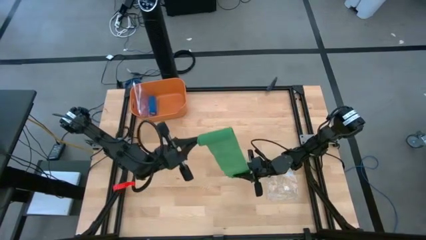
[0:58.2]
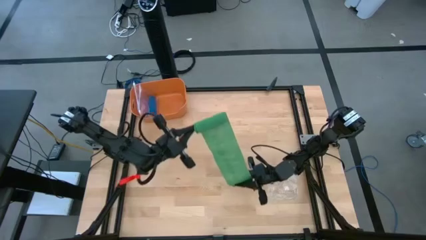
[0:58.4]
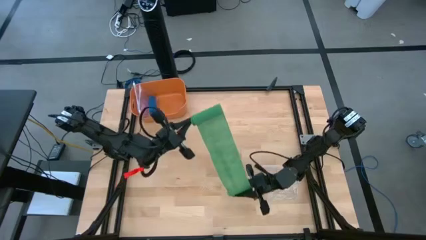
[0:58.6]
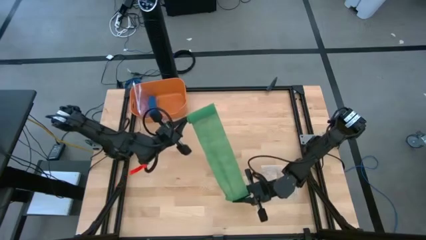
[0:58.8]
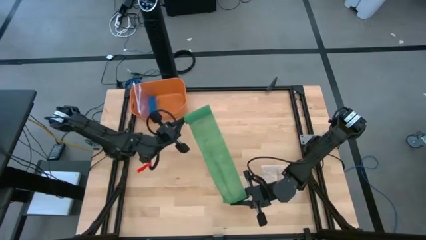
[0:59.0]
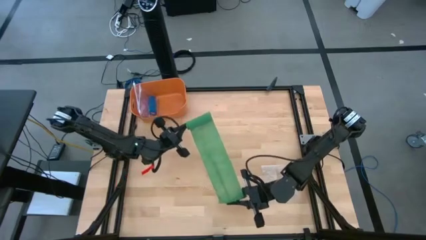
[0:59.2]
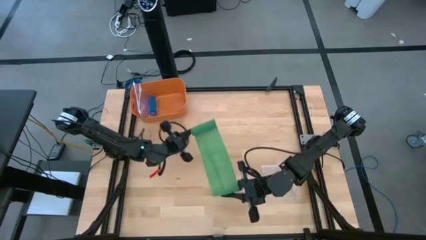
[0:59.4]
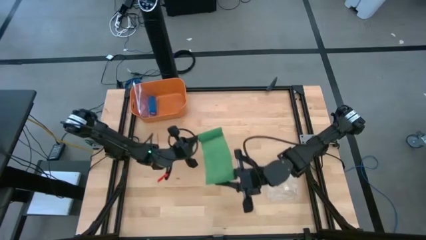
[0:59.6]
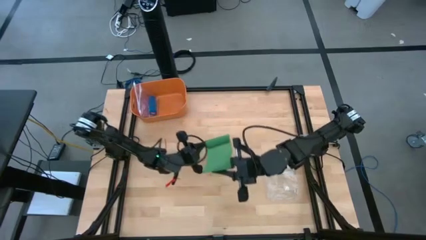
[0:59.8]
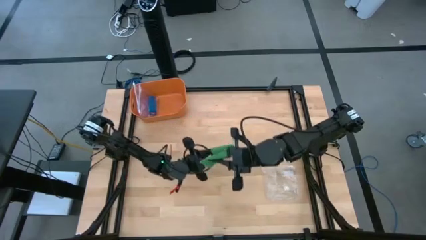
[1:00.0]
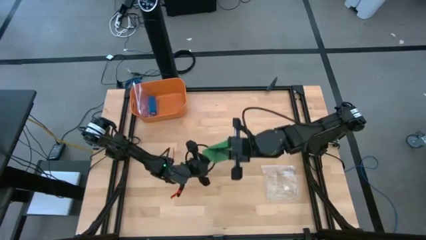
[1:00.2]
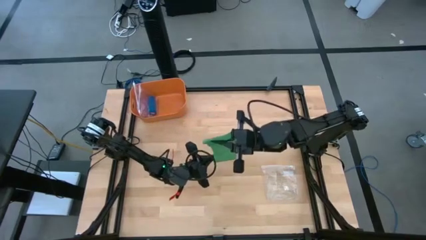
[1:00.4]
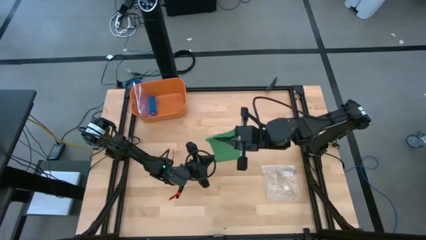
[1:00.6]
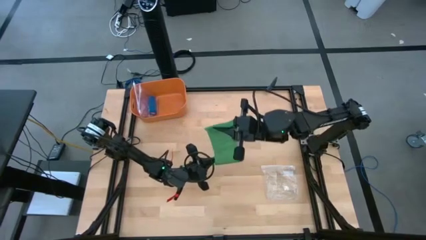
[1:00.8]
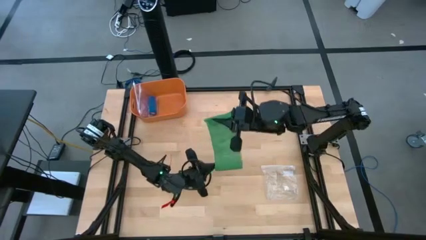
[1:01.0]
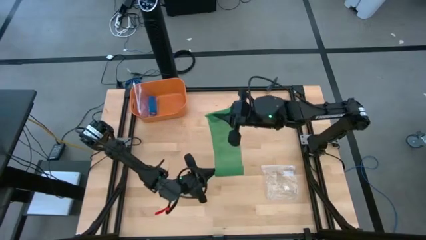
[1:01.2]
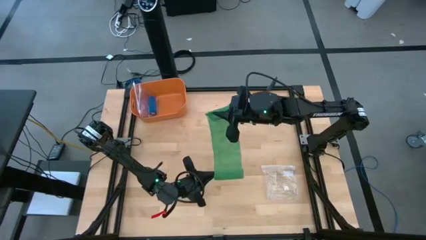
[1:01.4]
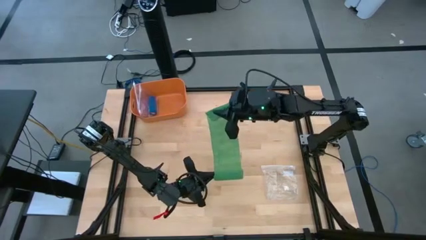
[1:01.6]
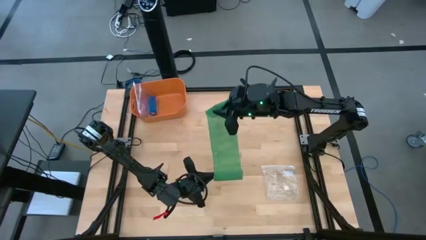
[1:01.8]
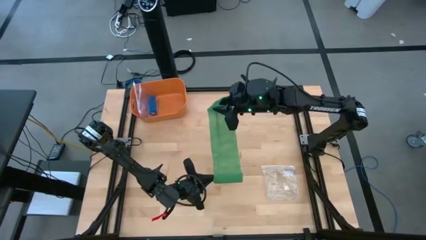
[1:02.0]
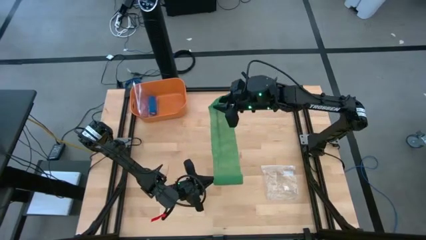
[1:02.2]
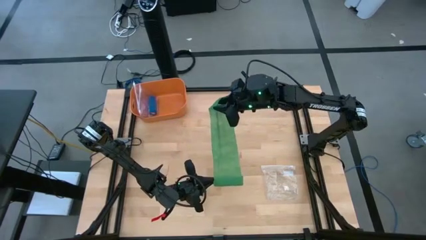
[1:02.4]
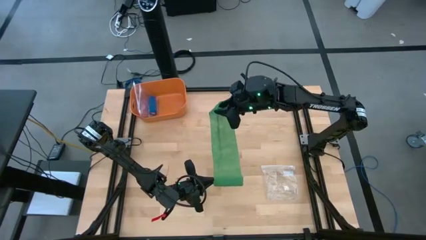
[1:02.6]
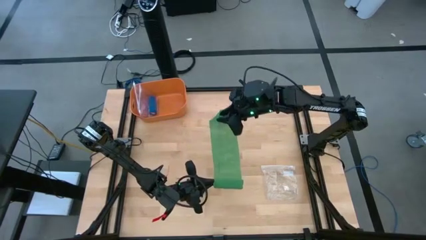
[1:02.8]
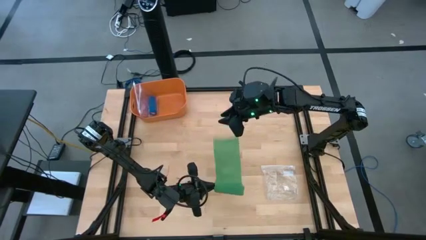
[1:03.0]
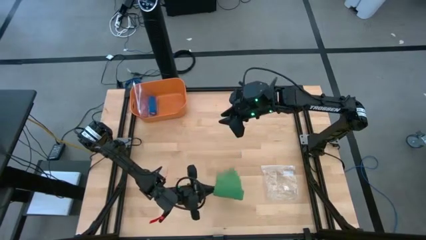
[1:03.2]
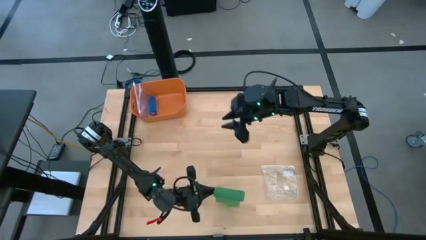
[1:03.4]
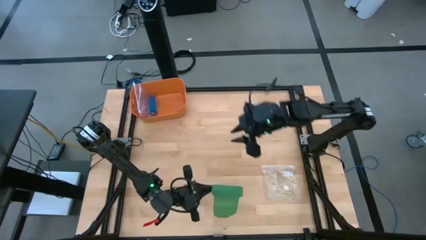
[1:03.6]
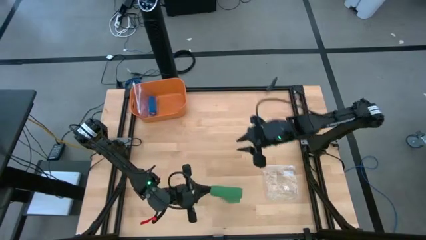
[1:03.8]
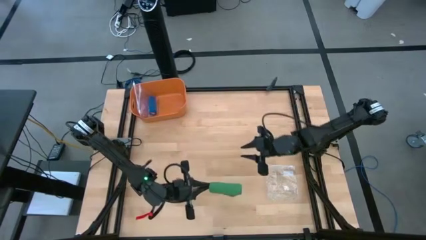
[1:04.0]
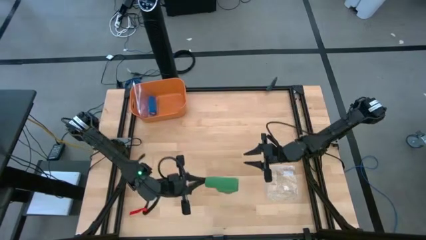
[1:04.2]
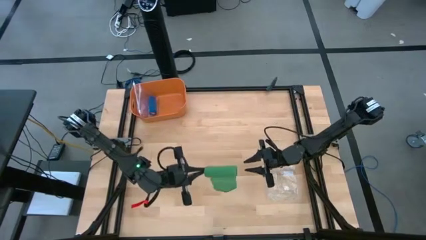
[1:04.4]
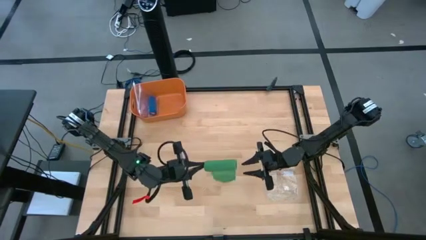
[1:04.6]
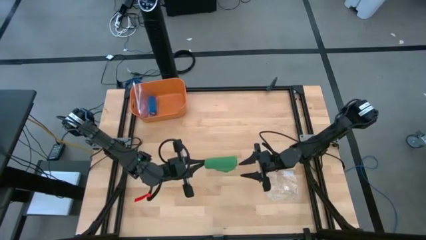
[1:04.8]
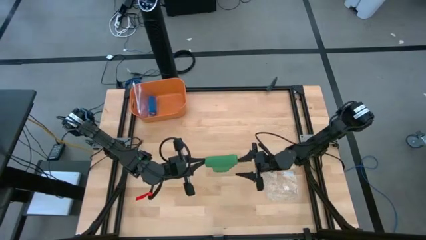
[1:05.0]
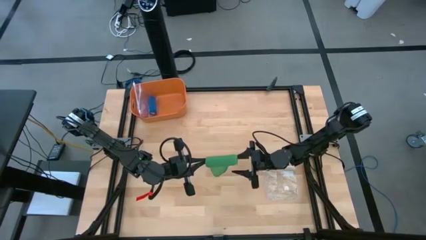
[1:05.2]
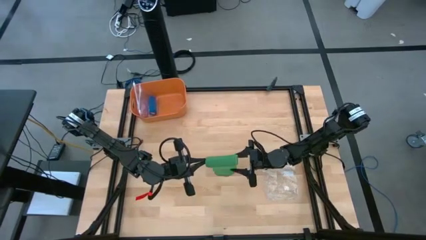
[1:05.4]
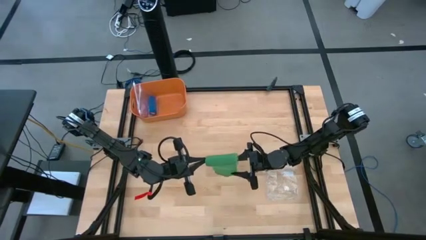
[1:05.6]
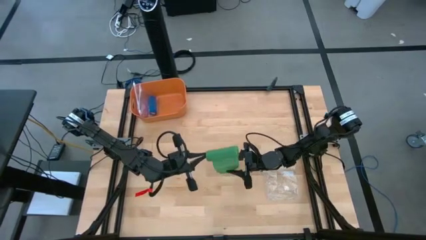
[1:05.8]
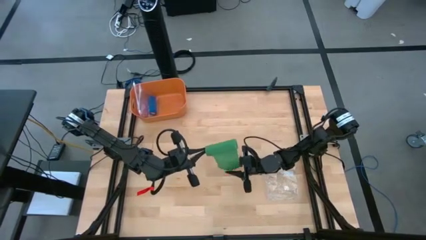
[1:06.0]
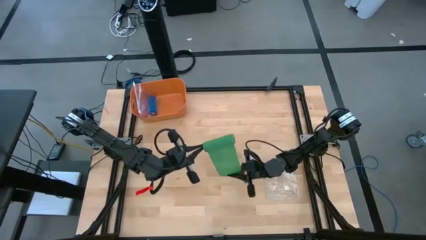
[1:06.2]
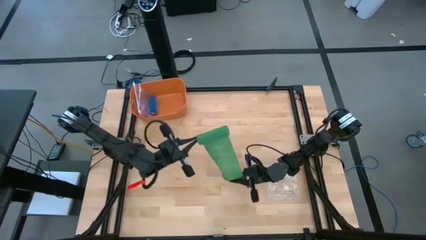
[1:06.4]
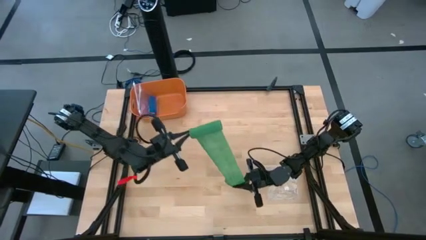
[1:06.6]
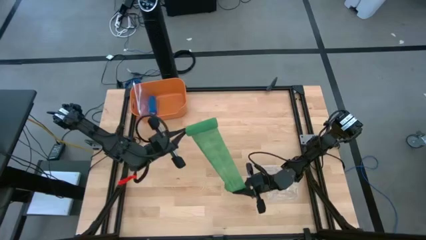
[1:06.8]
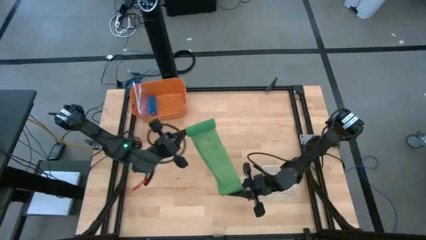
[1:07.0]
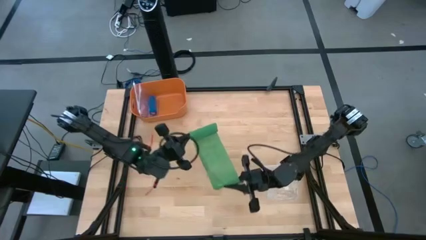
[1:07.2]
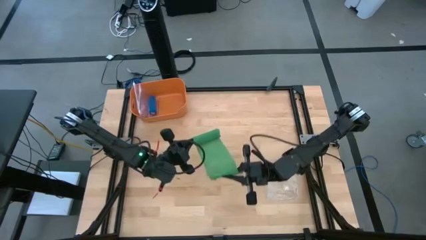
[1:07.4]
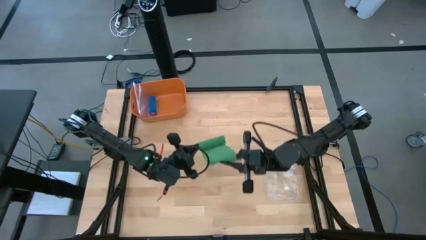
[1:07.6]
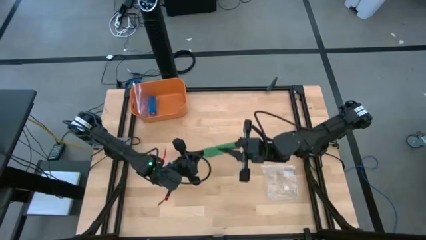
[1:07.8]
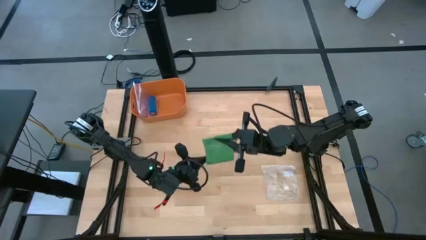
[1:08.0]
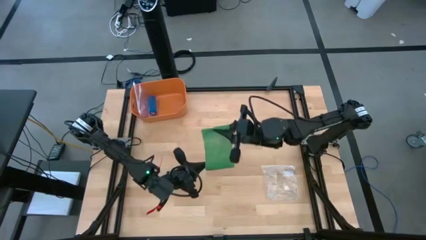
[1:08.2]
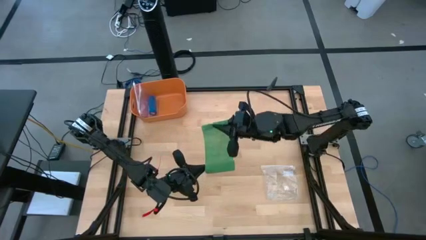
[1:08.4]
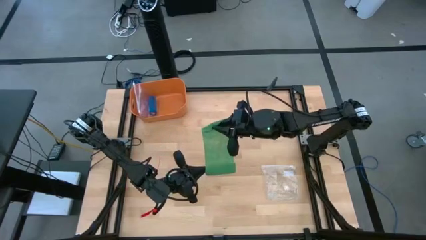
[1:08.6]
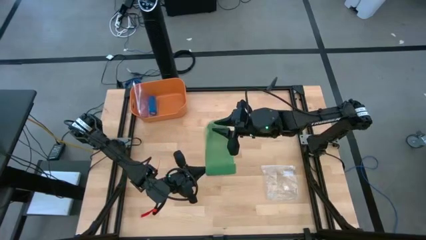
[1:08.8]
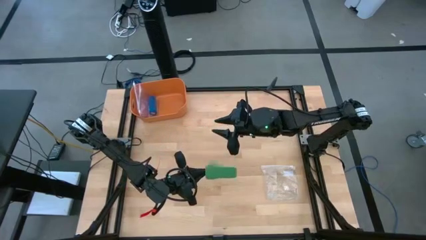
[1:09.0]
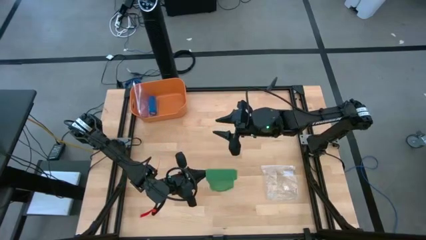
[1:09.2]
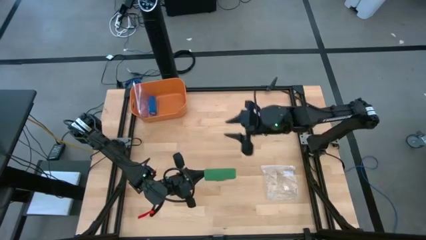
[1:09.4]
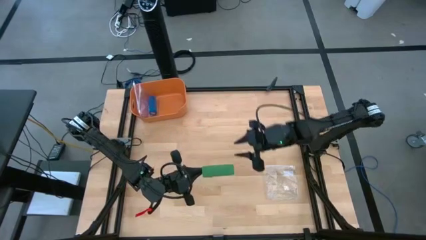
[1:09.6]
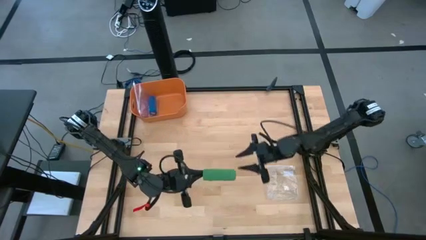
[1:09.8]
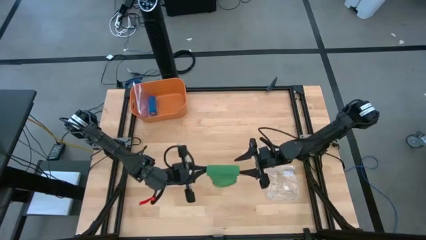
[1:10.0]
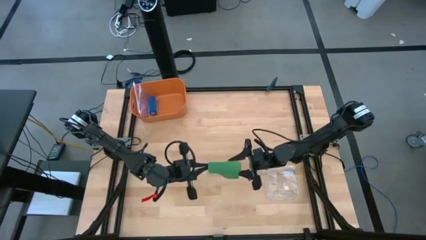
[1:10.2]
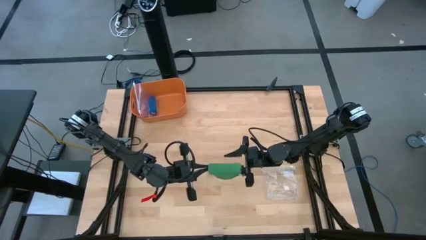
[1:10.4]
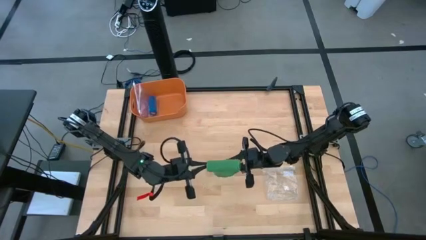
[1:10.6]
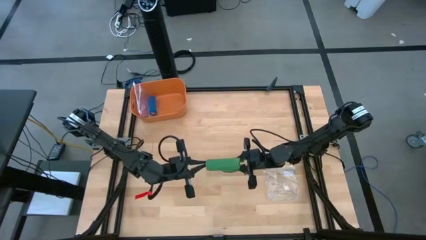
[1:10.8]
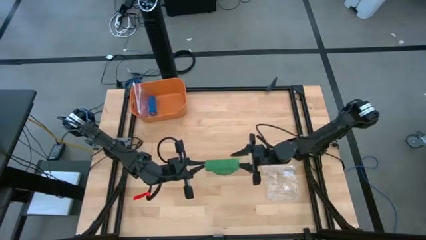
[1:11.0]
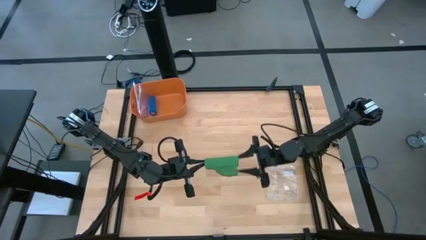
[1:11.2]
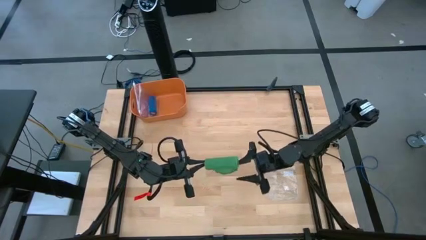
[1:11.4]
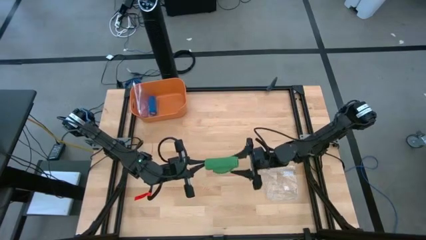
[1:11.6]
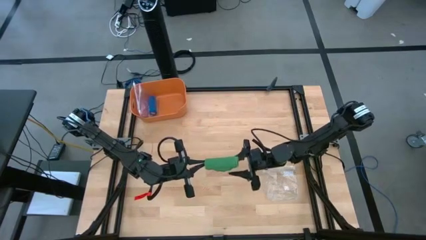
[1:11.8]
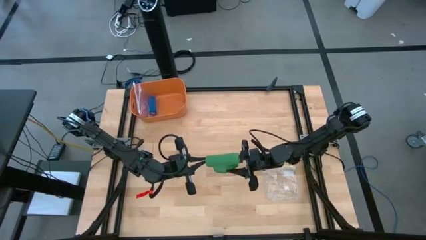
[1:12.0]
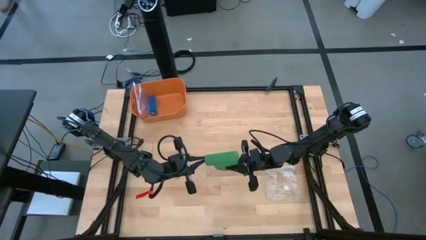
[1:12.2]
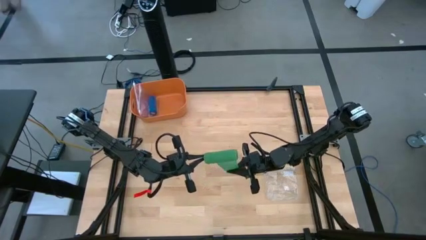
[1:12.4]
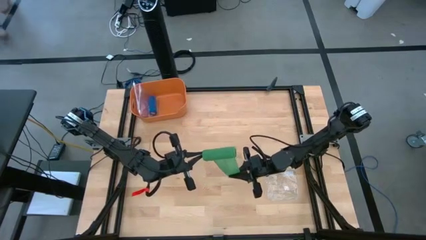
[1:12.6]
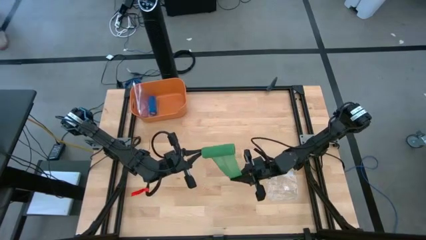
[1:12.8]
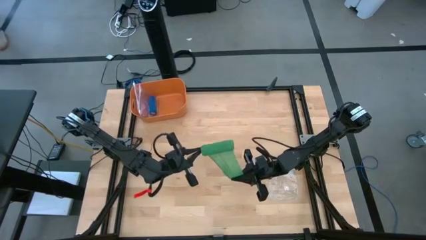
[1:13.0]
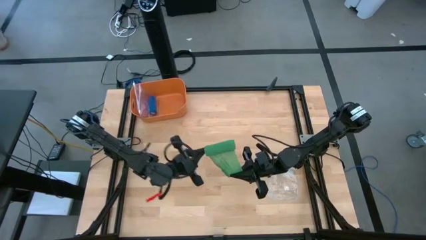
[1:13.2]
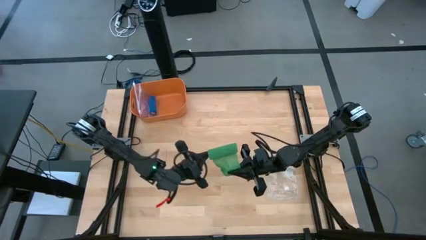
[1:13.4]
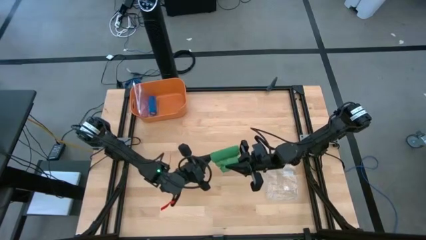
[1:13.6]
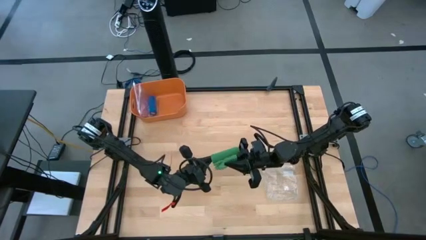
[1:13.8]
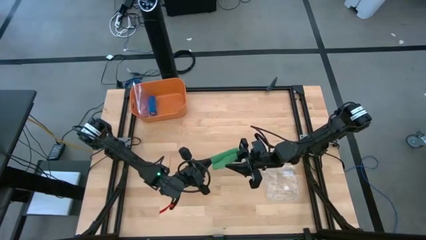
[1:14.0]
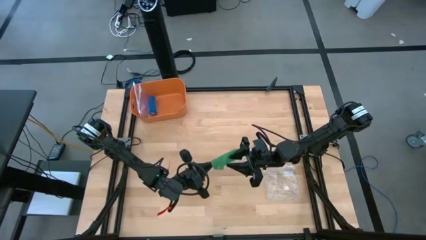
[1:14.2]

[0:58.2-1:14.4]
Task: Roll bandage
Roll the green bandage
